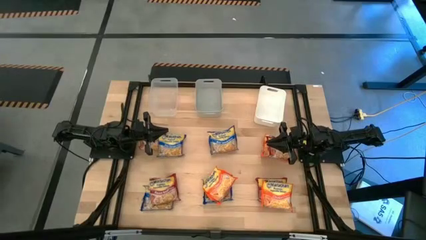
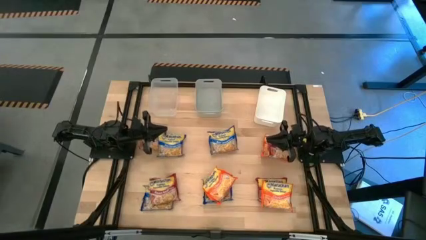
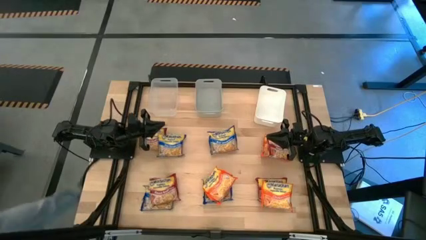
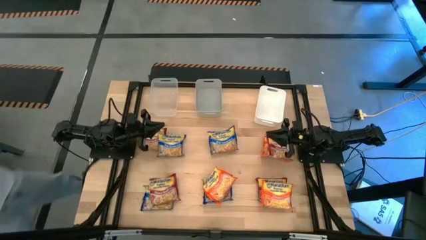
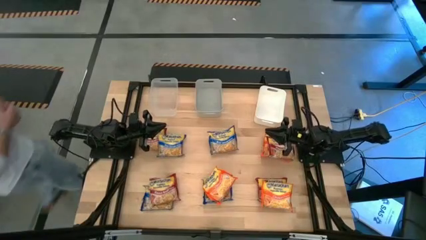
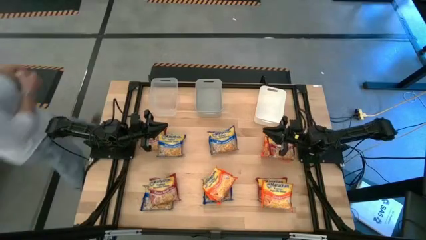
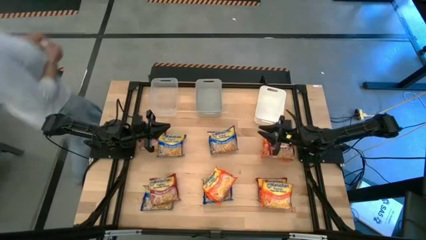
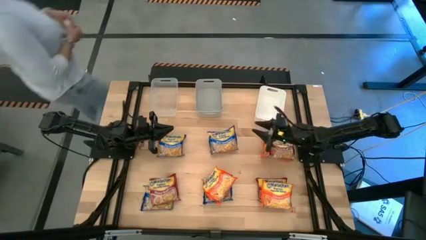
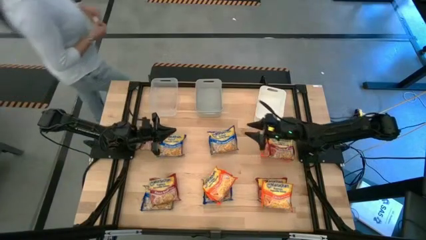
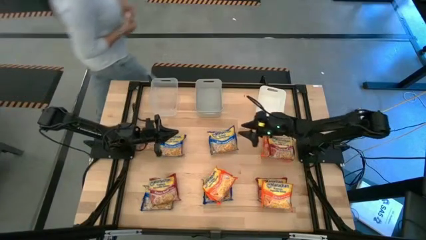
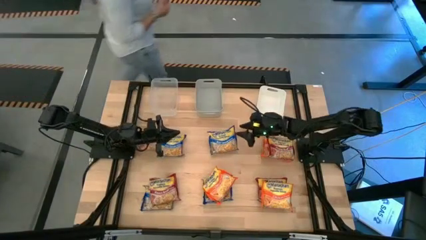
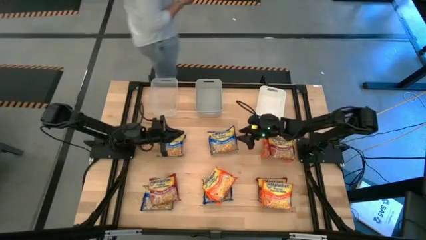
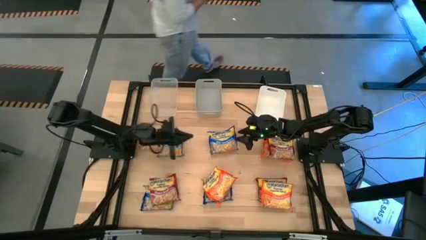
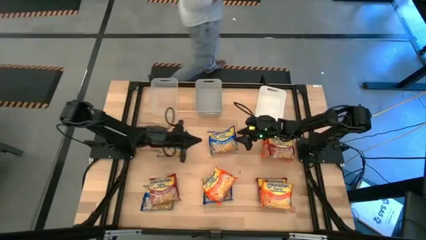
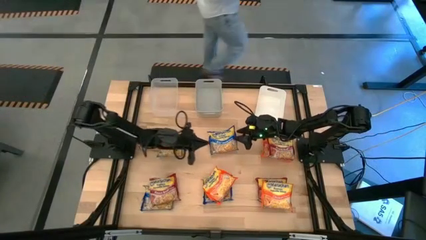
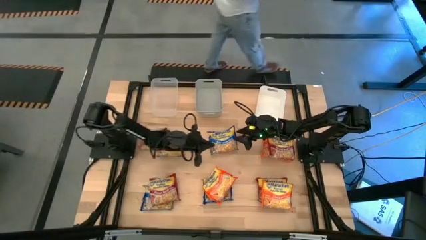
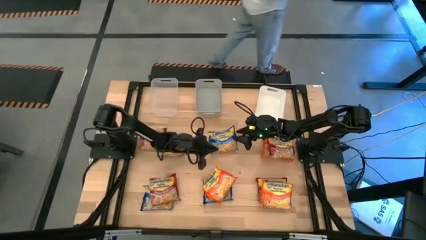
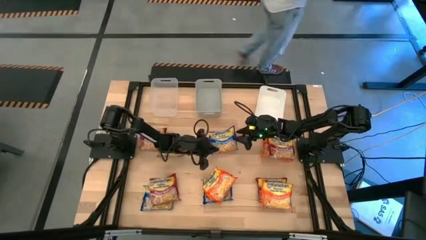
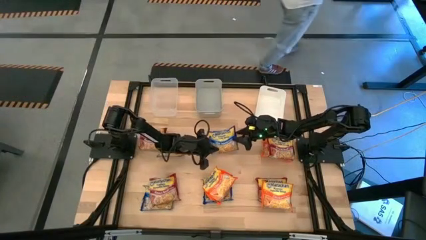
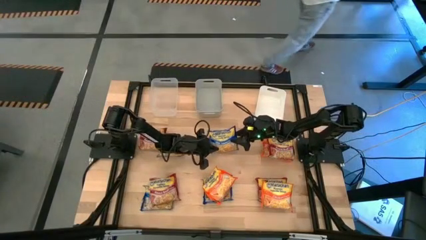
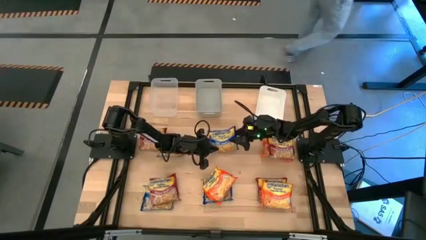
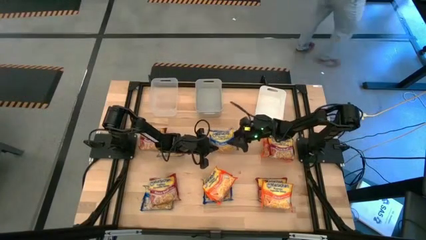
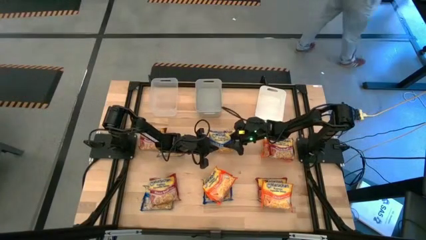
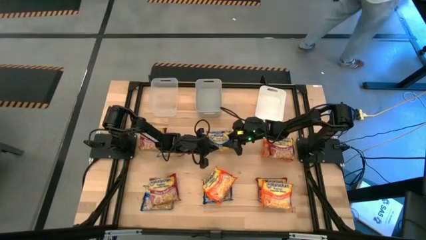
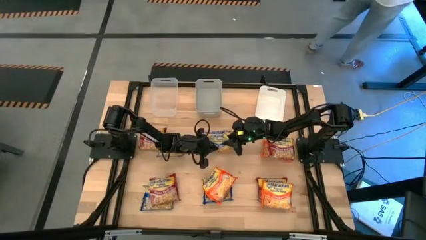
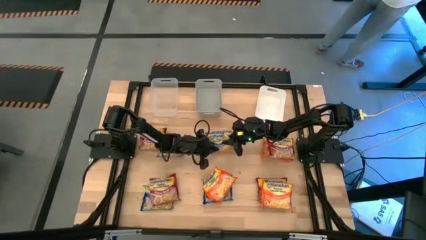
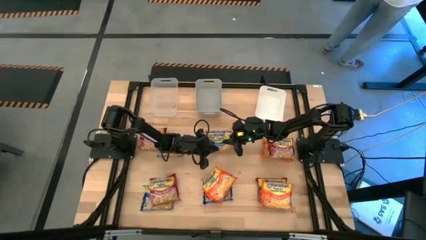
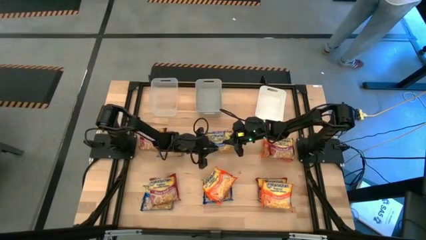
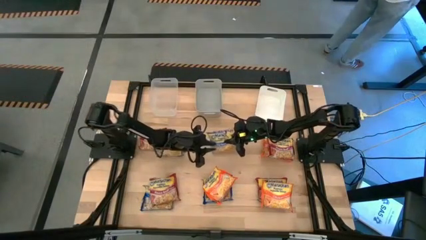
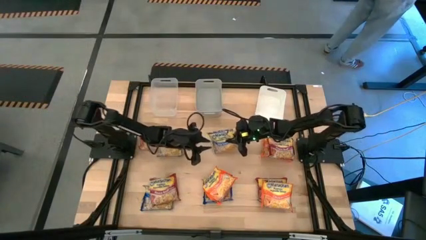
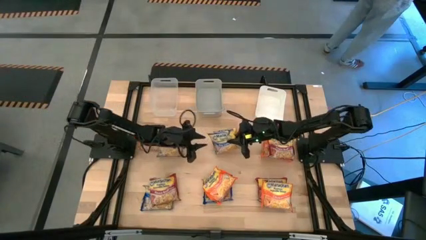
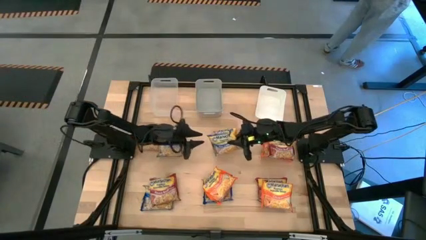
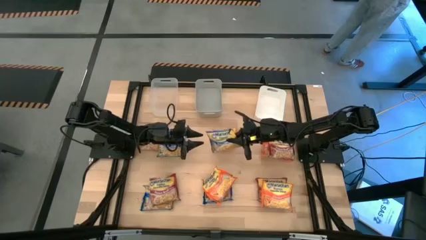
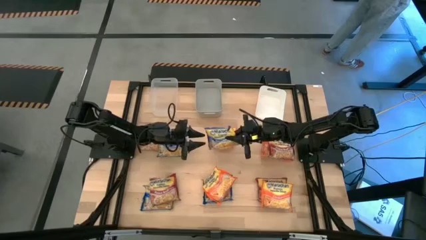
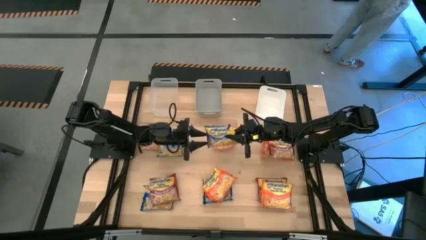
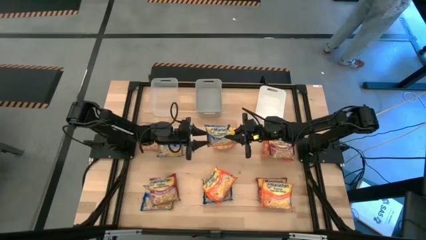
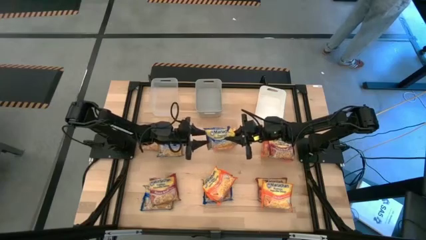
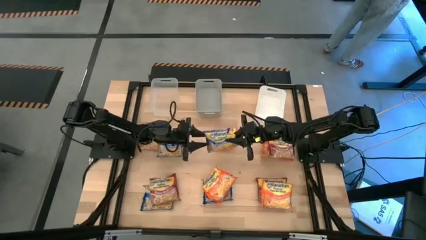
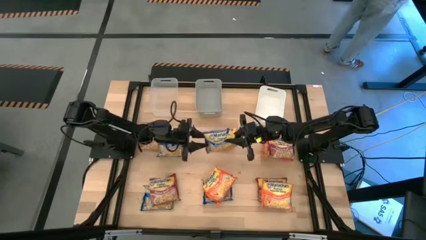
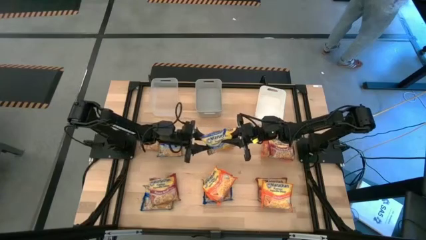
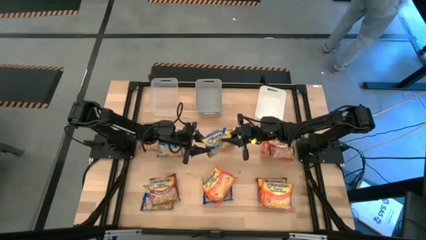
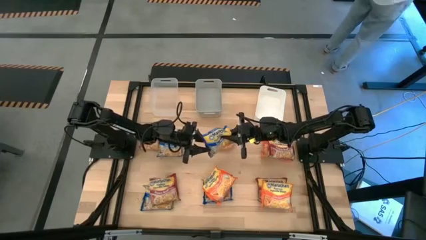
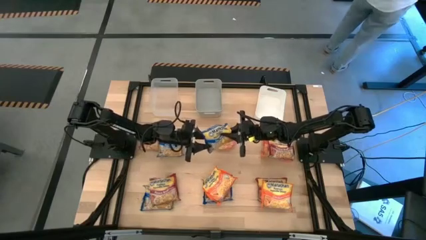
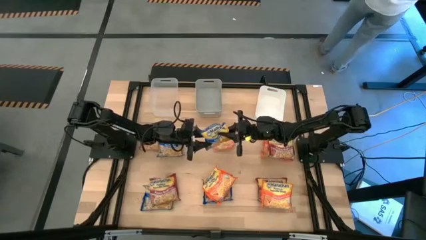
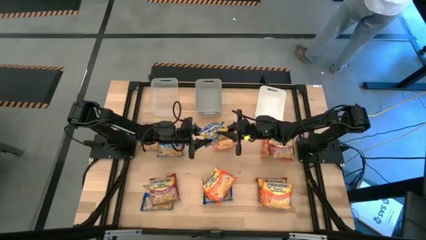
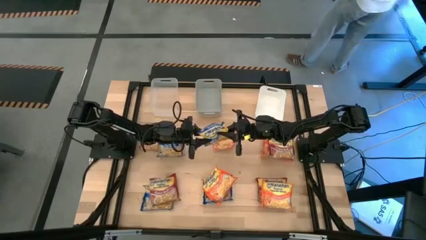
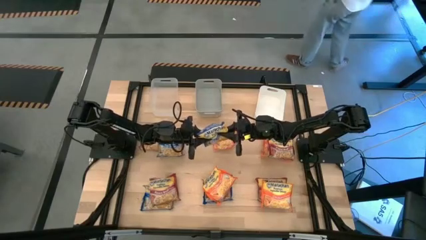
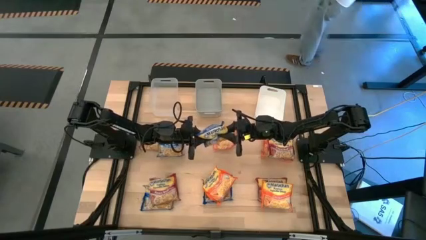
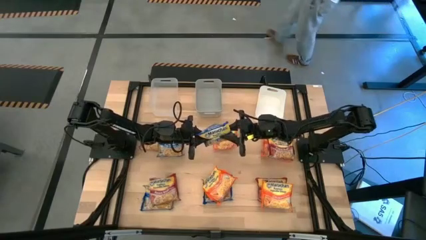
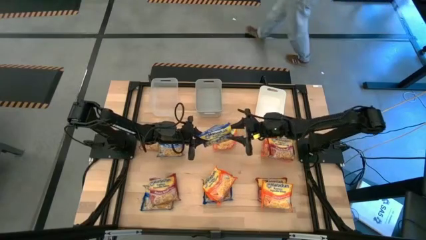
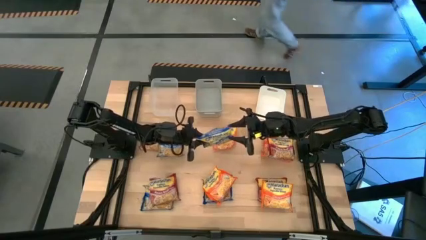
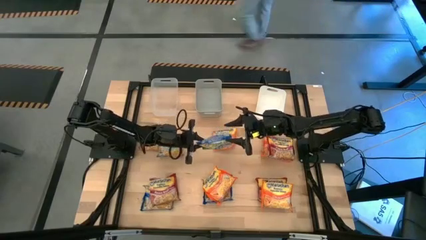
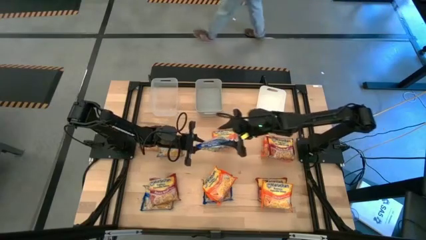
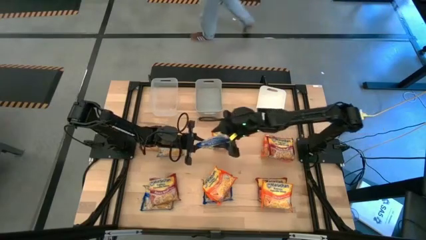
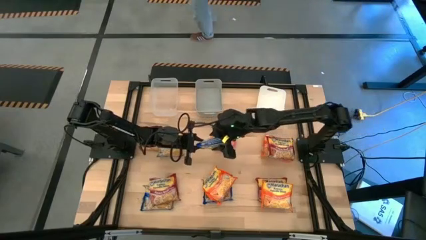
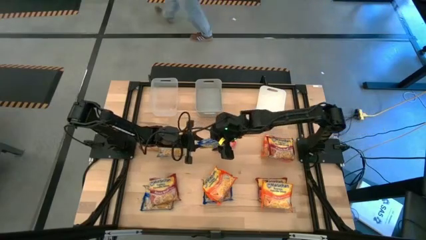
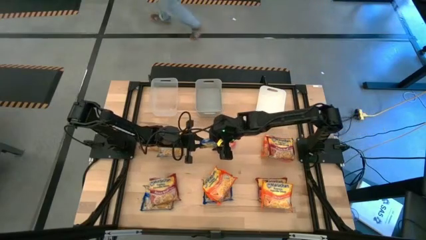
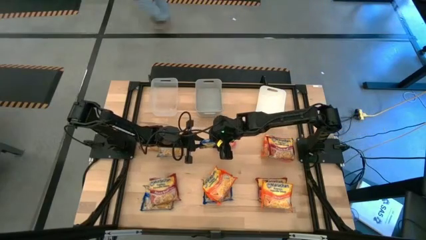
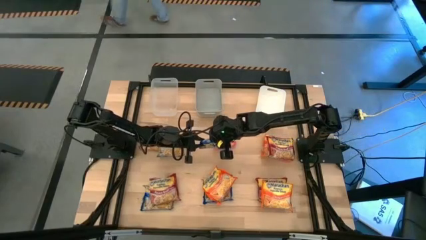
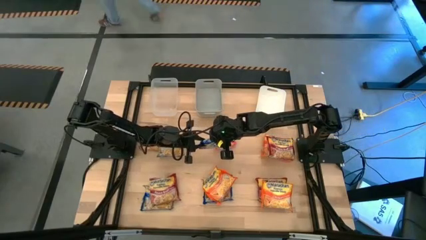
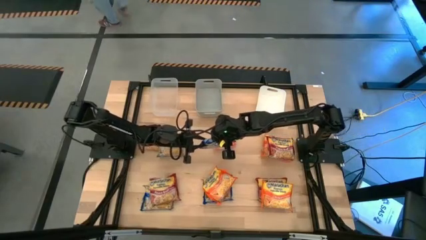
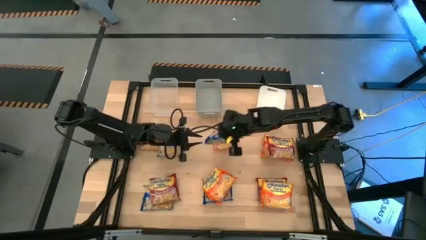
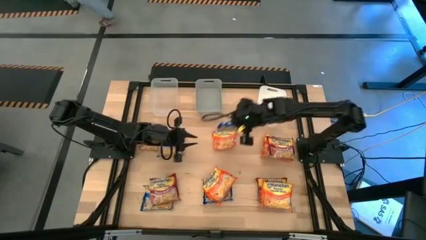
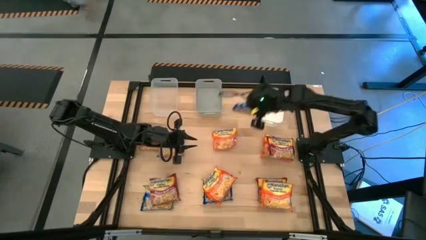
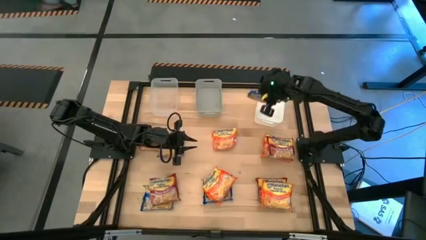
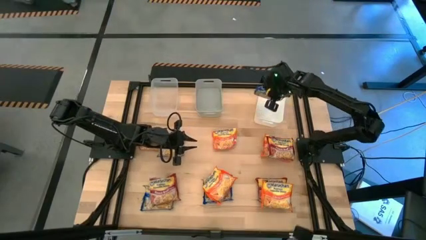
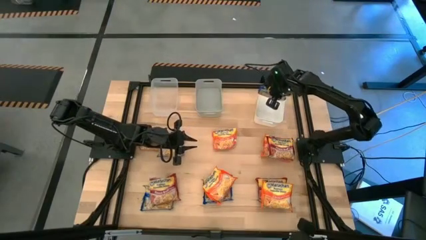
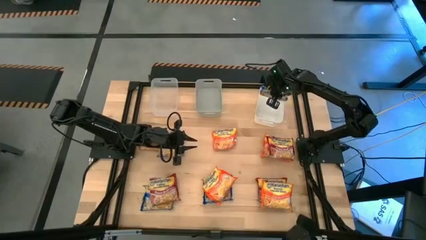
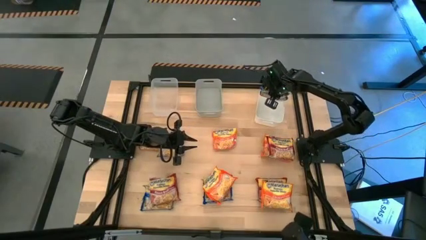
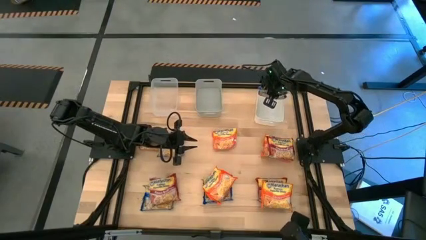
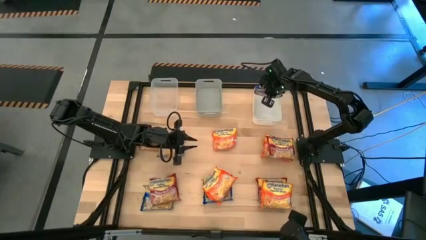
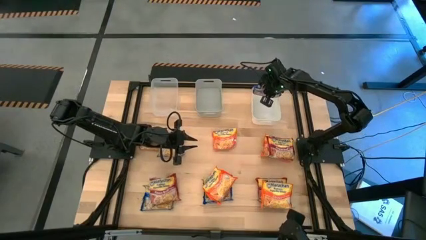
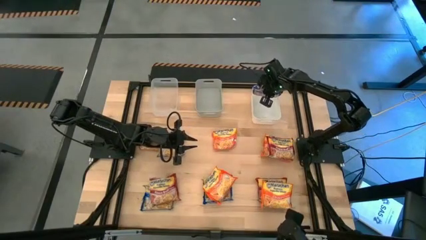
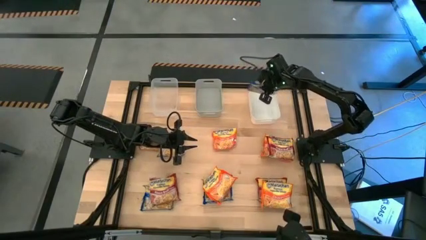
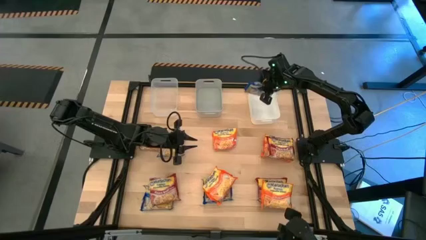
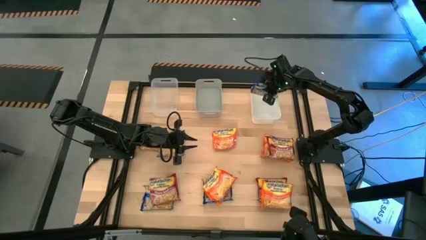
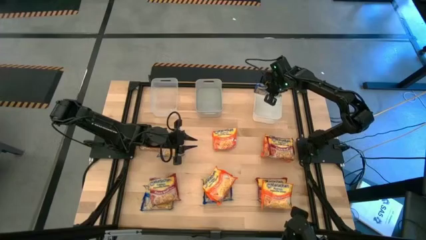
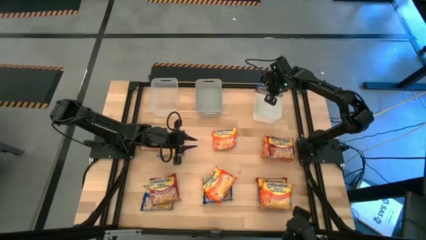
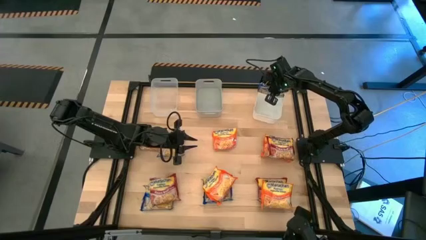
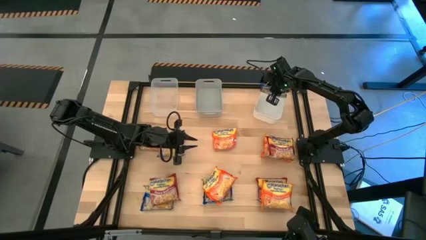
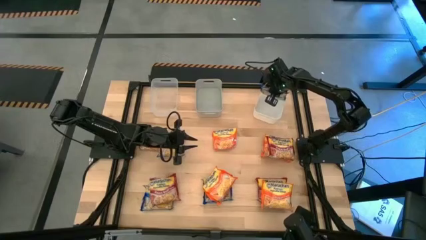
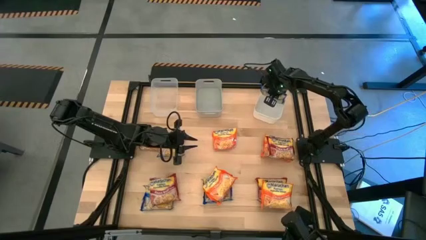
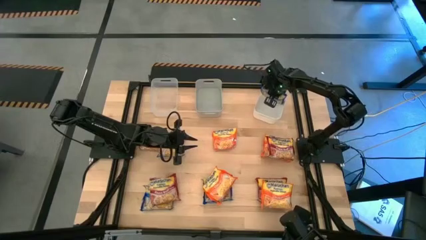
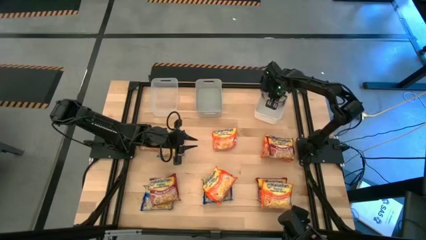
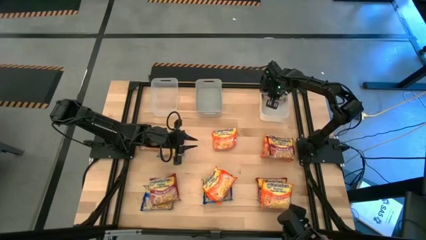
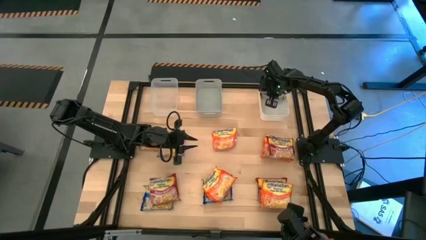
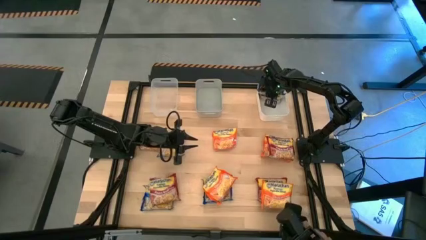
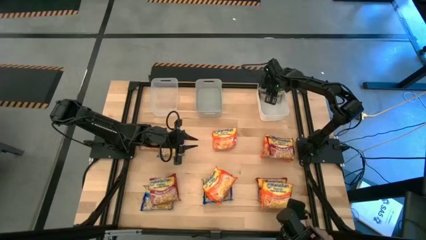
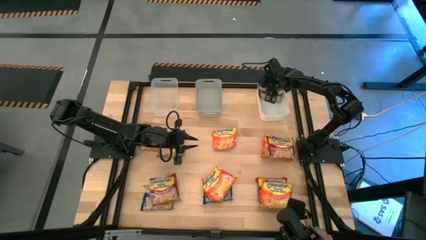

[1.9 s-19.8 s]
Task: Sort Maruchan noodles
Put the blue noodle pack into the white bin
